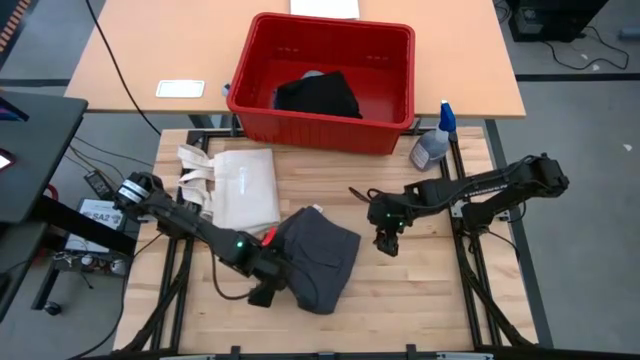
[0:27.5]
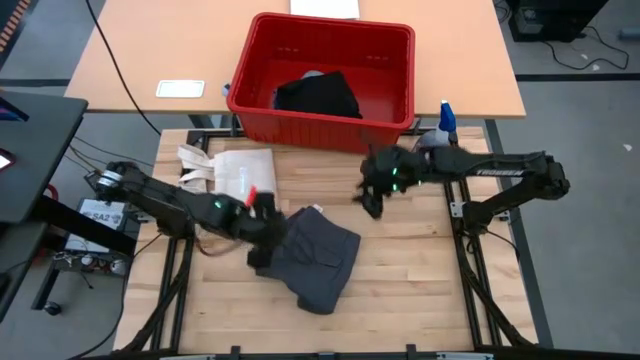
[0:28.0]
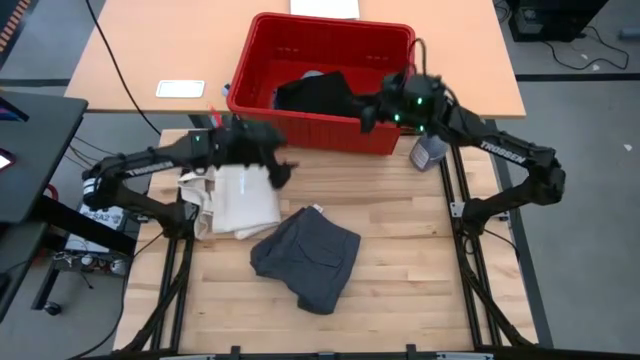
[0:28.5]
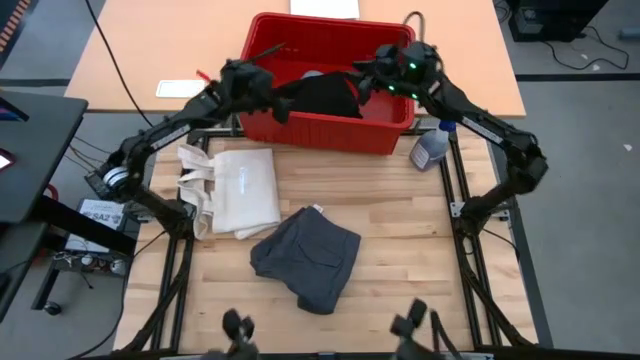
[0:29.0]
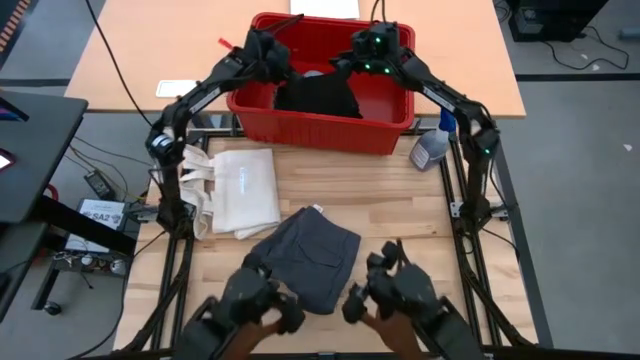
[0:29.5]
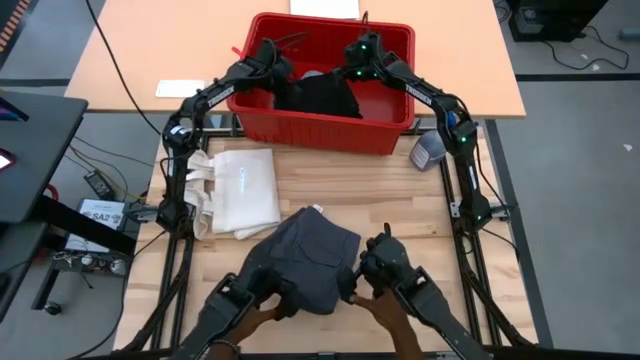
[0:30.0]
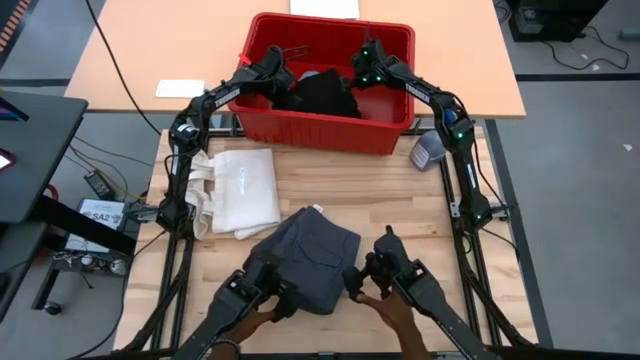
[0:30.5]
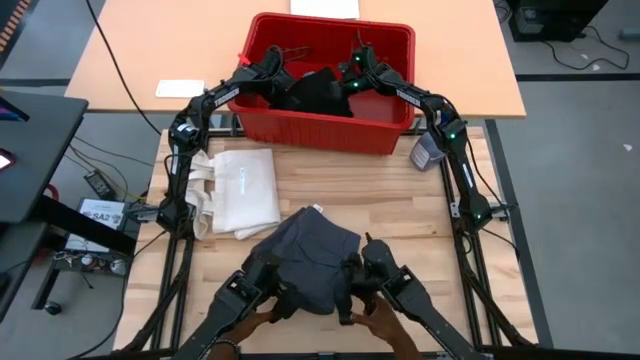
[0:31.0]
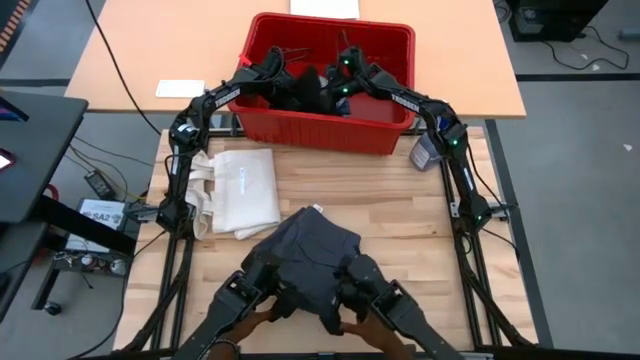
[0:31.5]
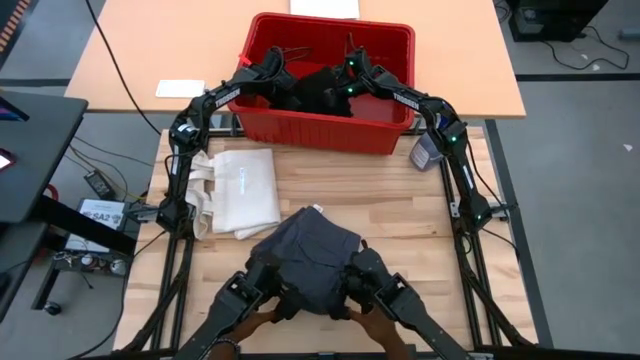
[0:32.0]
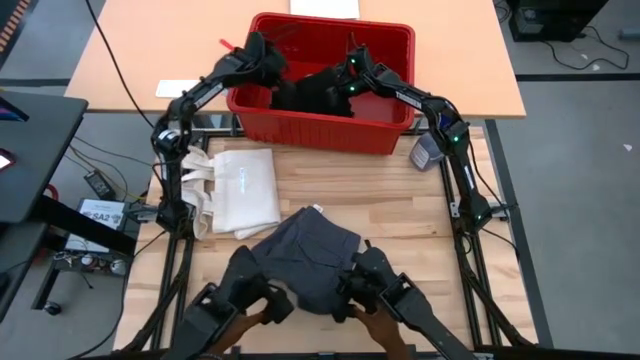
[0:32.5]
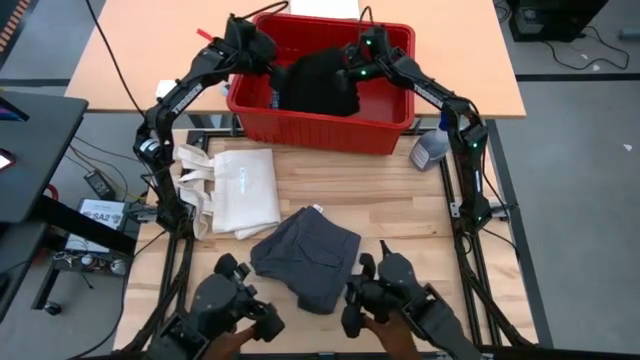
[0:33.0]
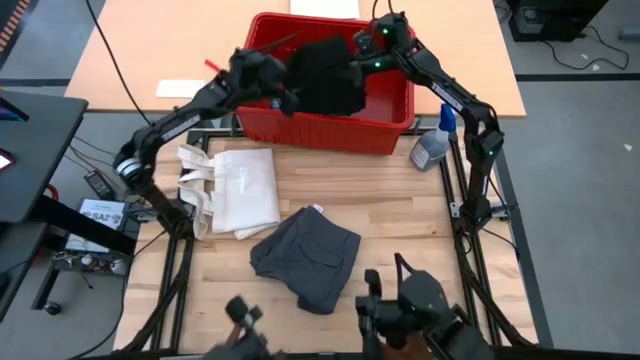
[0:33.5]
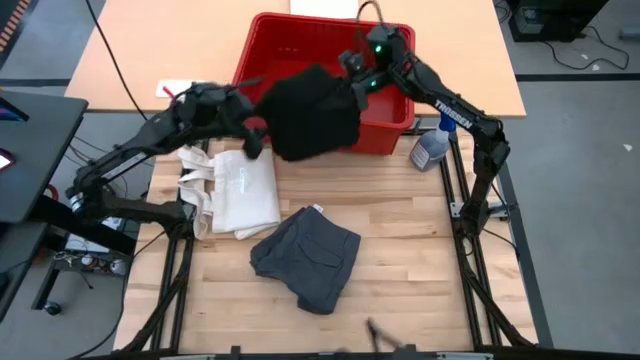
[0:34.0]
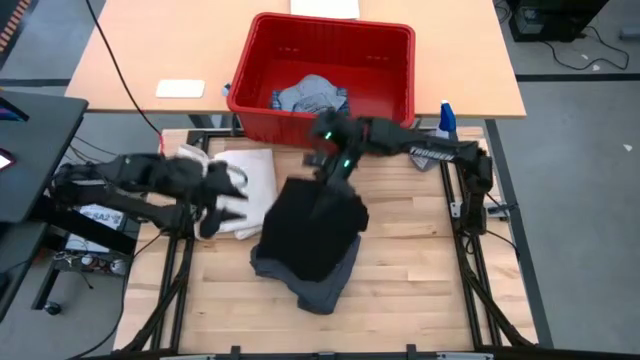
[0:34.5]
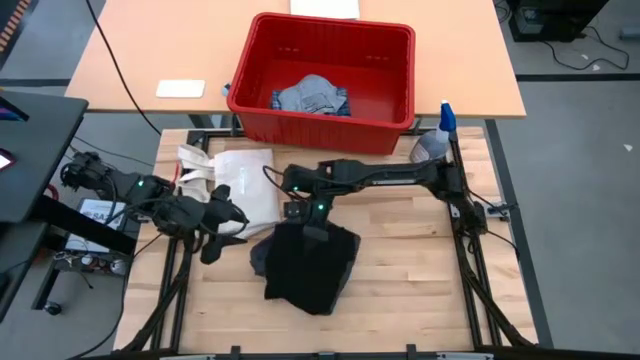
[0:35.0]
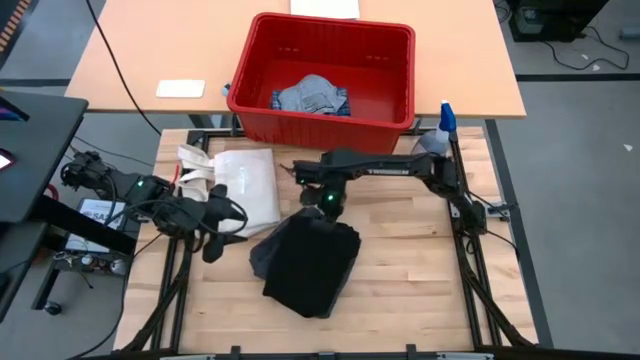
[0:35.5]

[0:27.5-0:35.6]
Task: Sort clothes
Remove the black shirt from the red bin

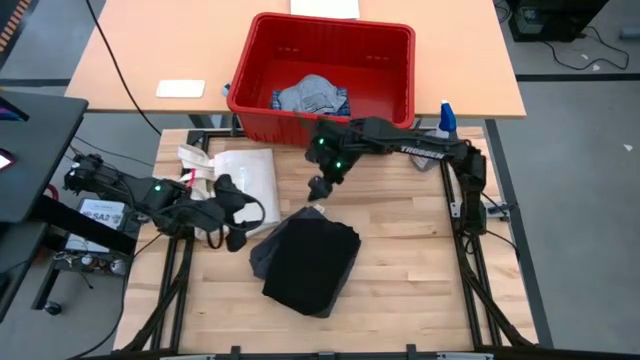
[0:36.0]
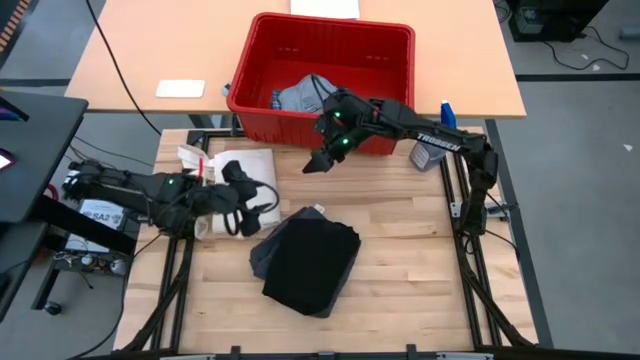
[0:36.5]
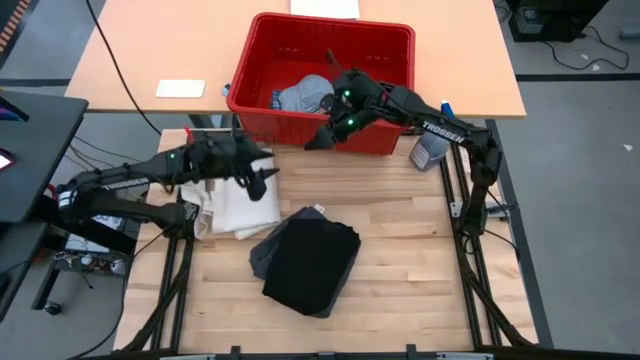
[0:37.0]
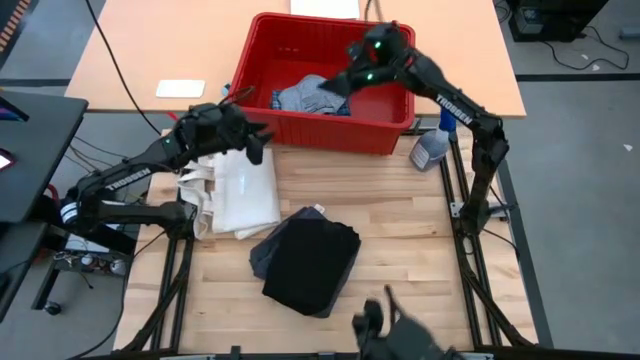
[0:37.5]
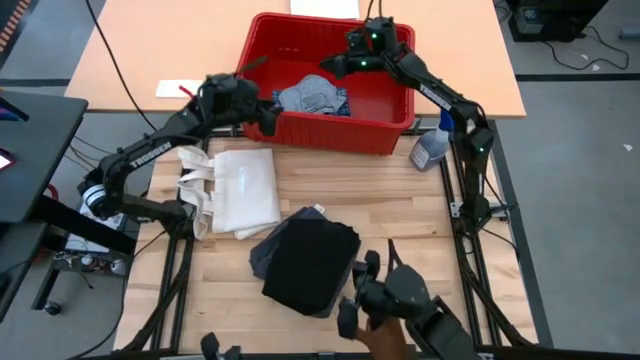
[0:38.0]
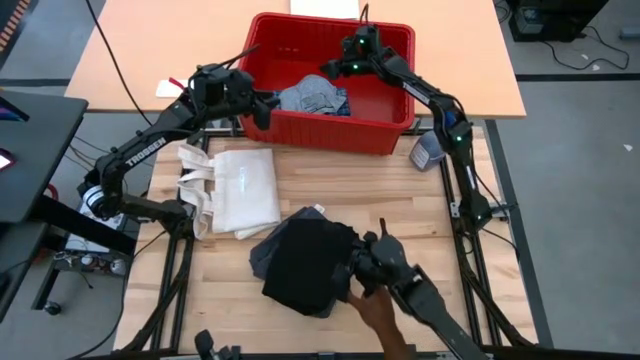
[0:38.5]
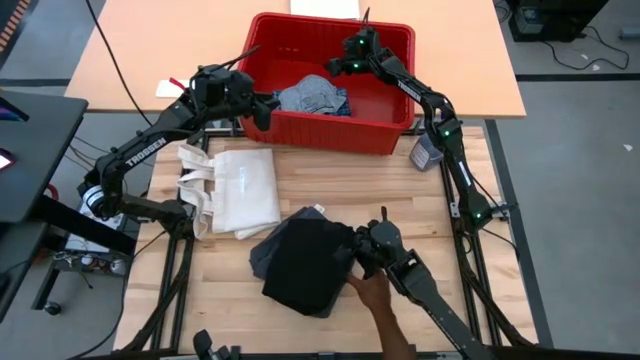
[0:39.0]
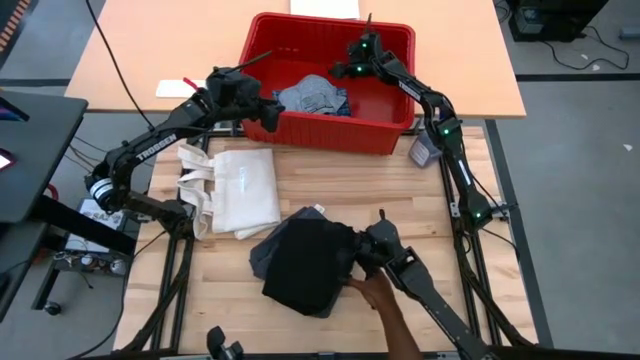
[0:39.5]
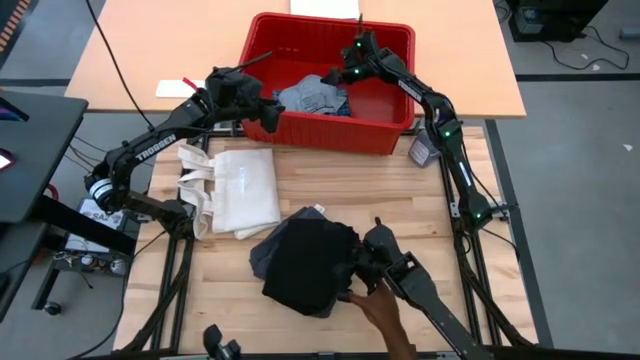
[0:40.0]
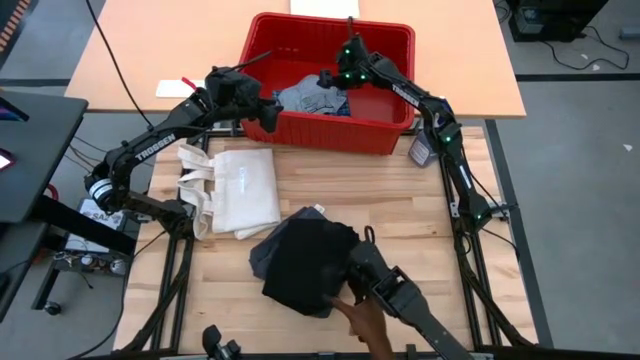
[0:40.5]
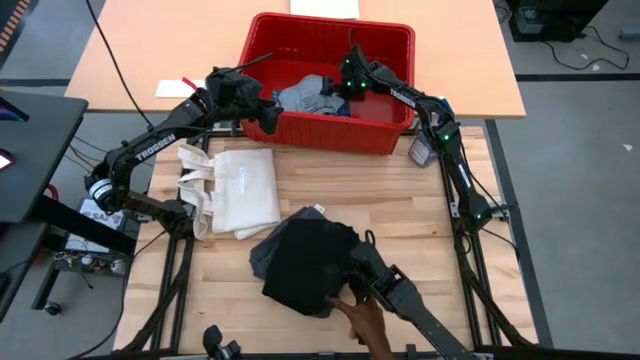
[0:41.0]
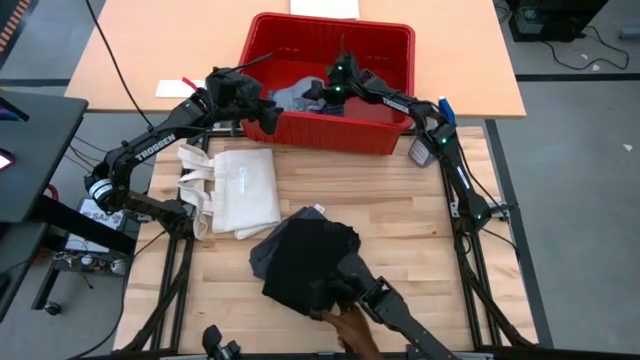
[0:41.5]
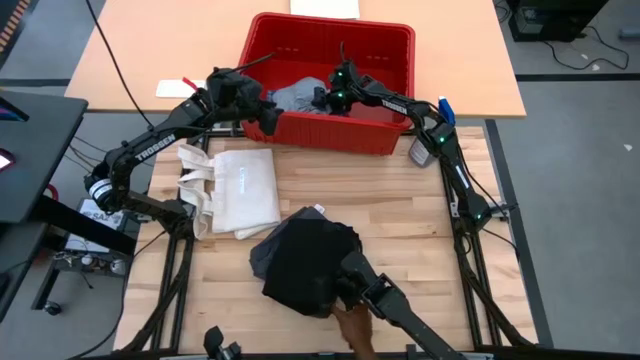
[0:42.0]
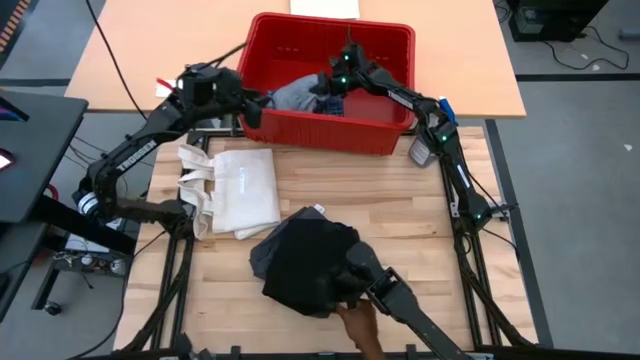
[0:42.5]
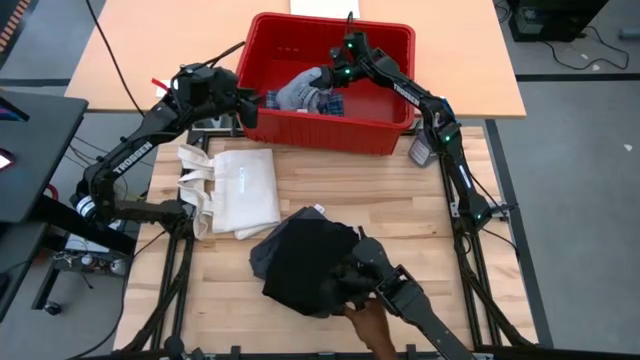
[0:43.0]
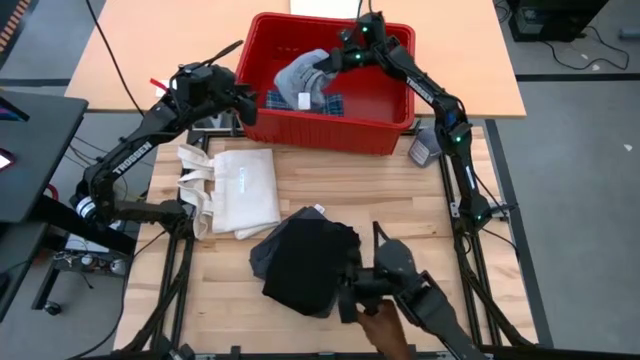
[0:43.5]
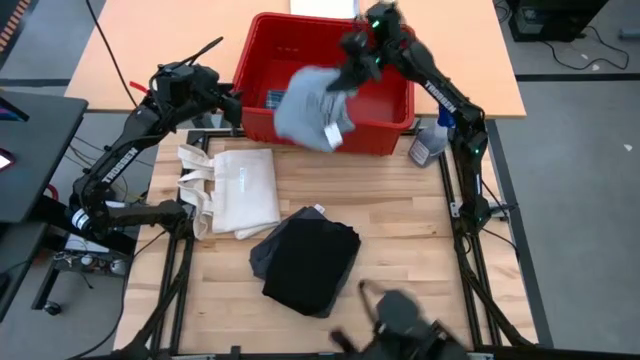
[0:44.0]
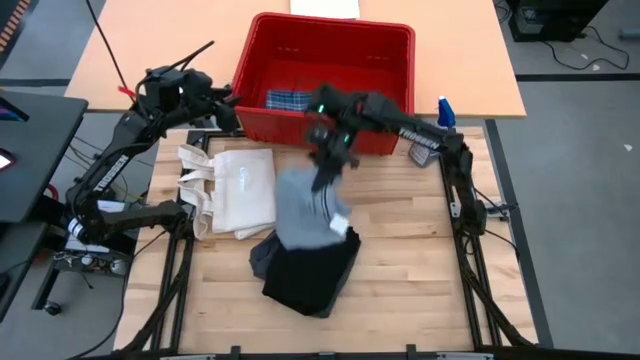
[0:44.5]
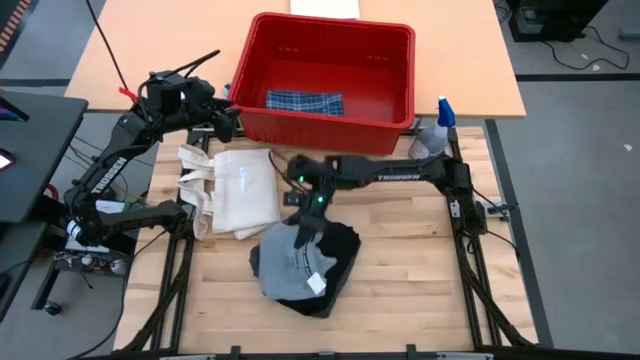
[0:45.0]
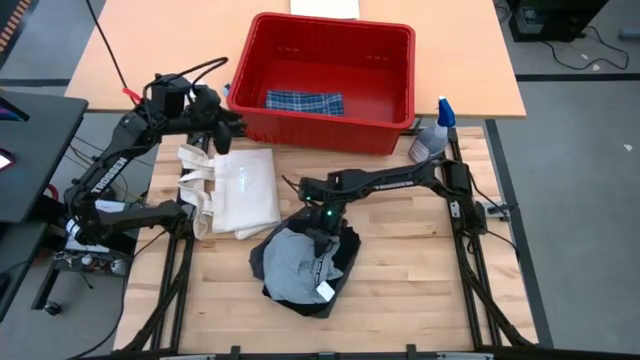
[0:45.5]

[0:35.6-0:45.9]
Remove the gray shirt from the red bin

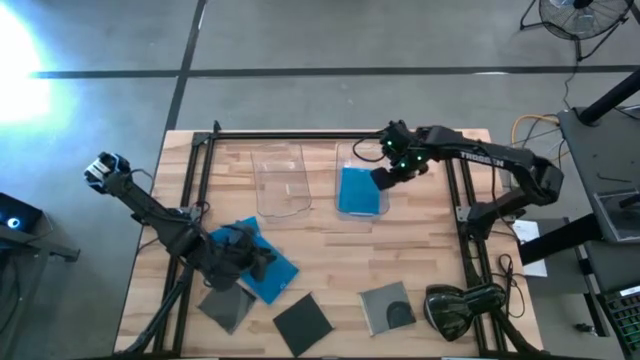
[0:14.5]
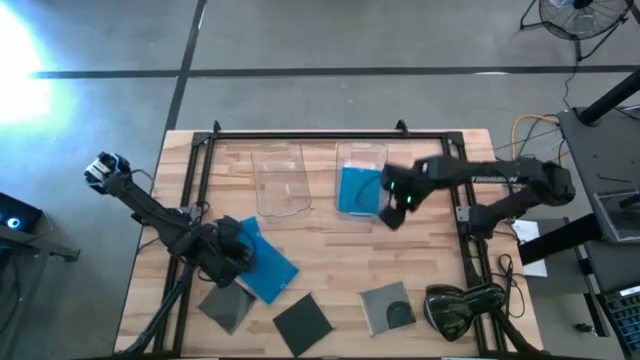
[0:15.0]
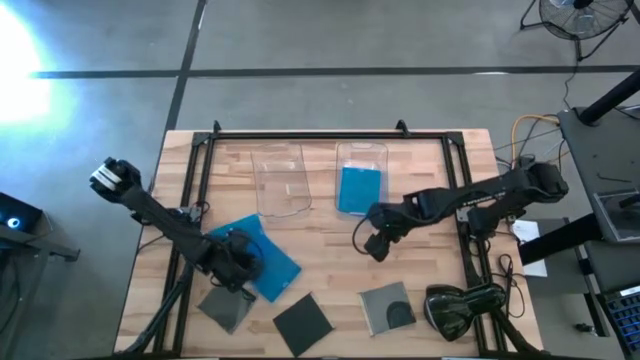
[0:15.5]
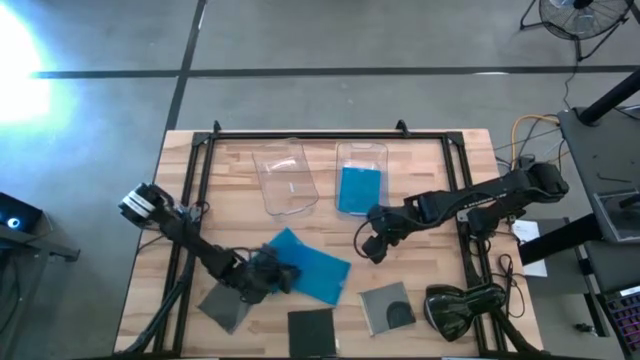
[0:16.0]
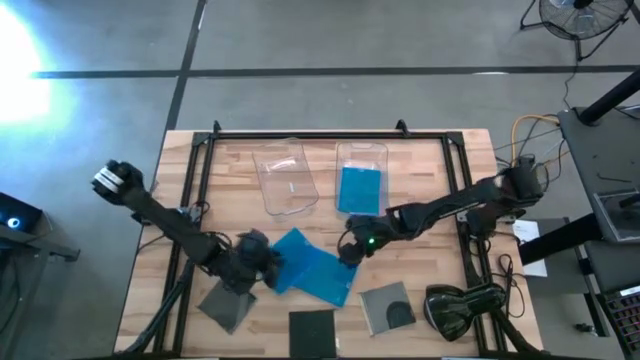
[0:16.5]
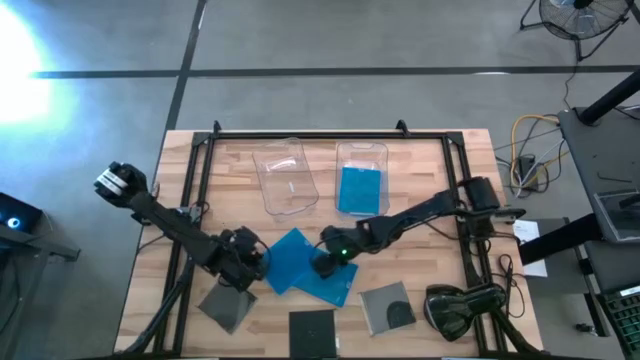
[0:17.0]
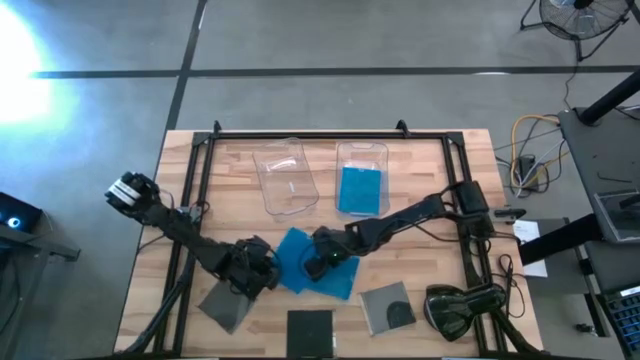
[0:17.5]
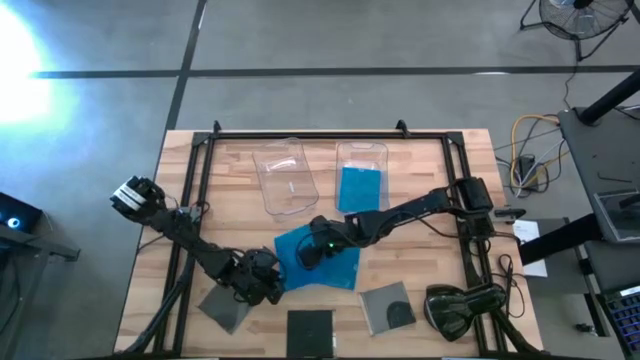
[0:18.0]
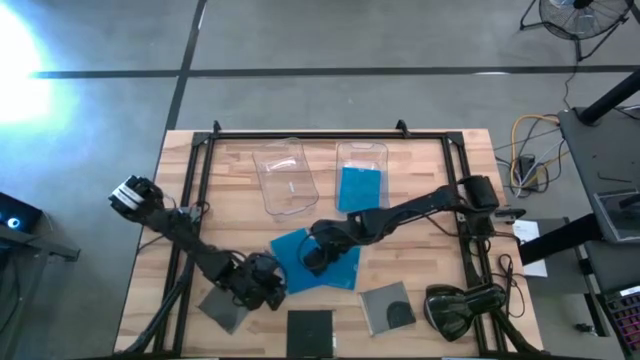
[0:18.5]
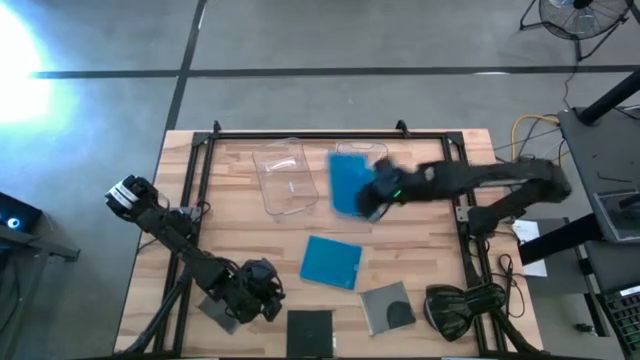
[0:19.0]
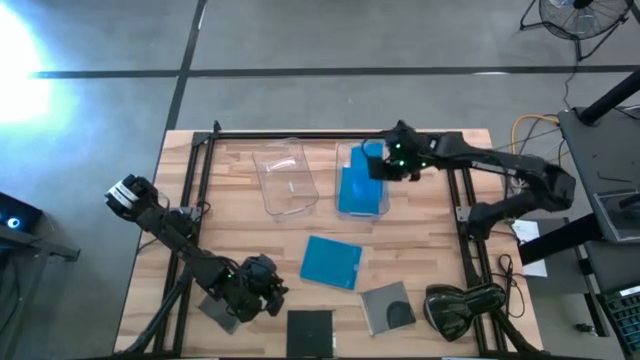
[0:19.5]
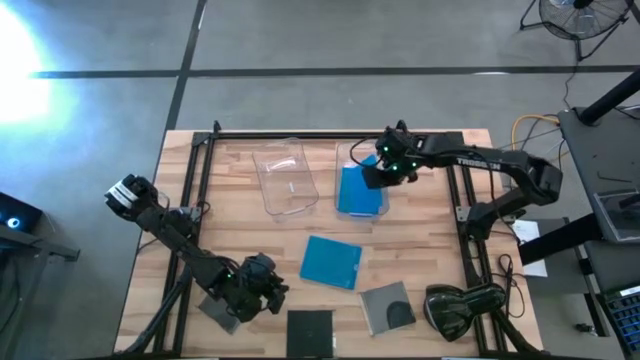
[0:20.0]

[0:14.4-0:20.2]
Task: Pick & place jewel cases by type
Put the left blue CD case into the right transparent bin
